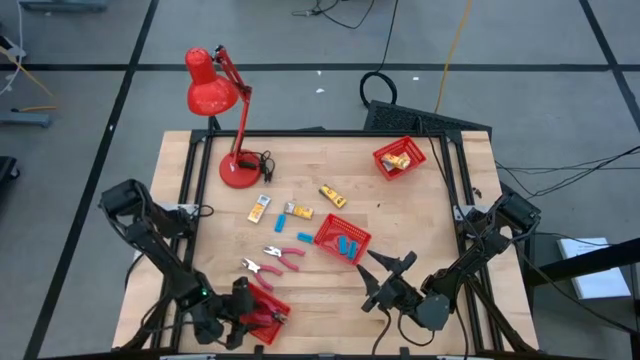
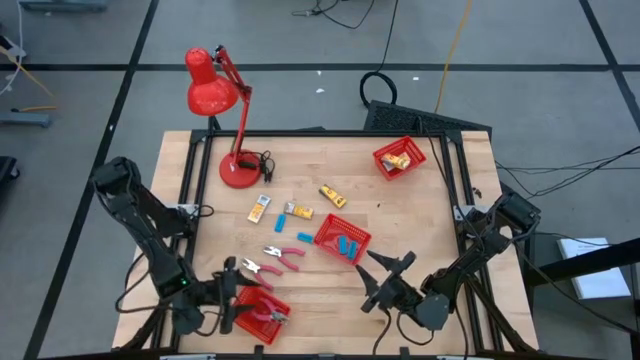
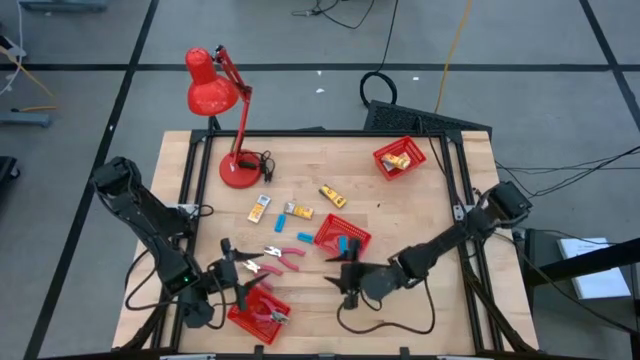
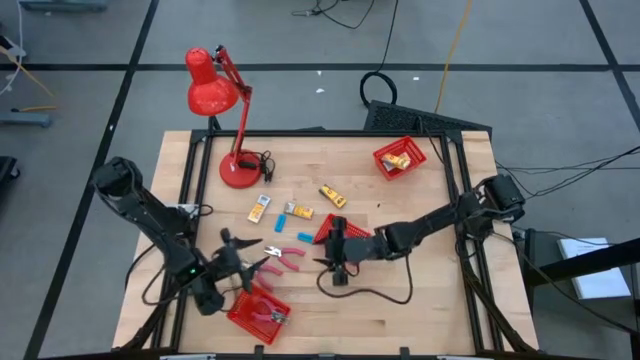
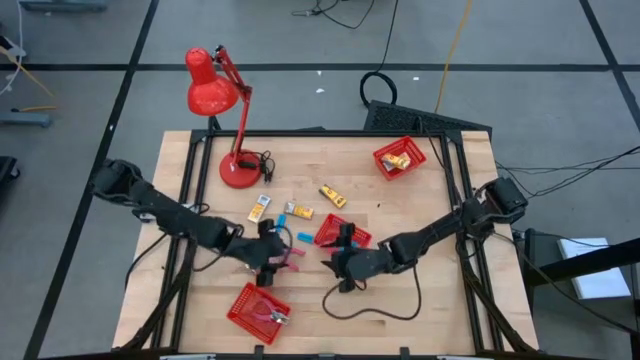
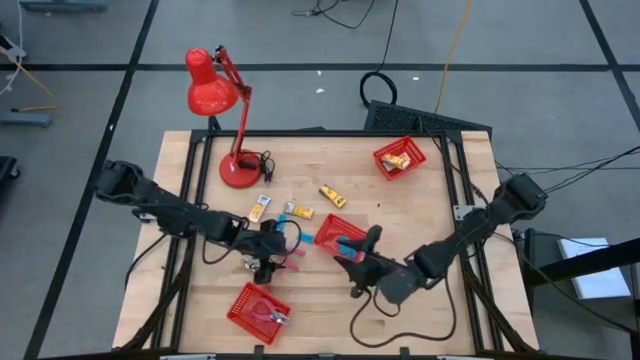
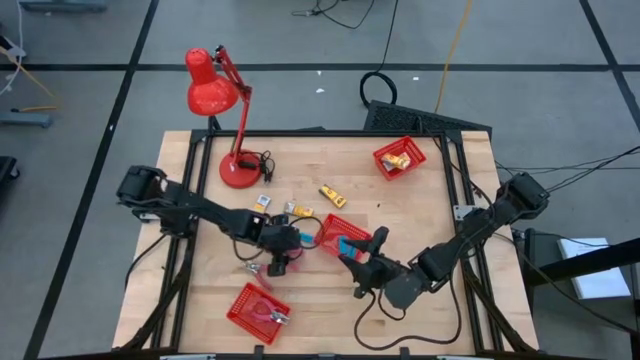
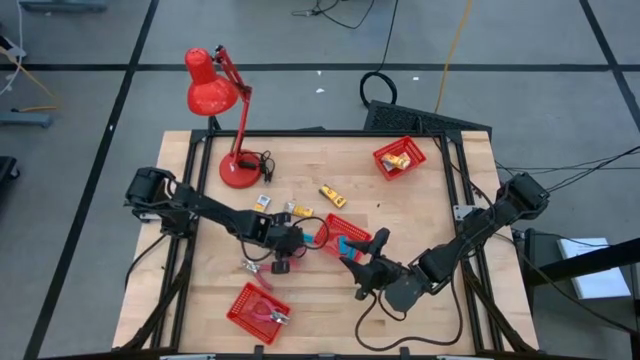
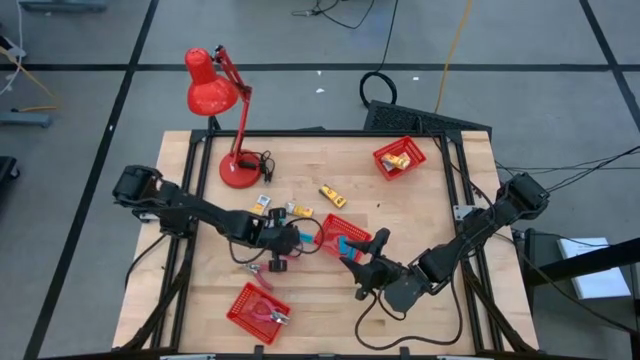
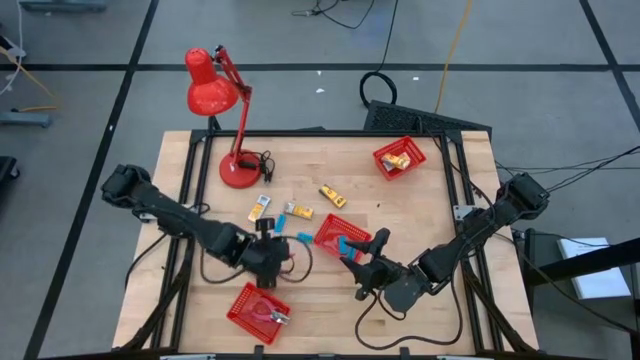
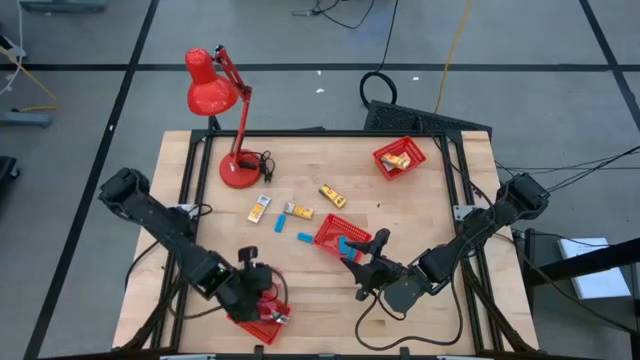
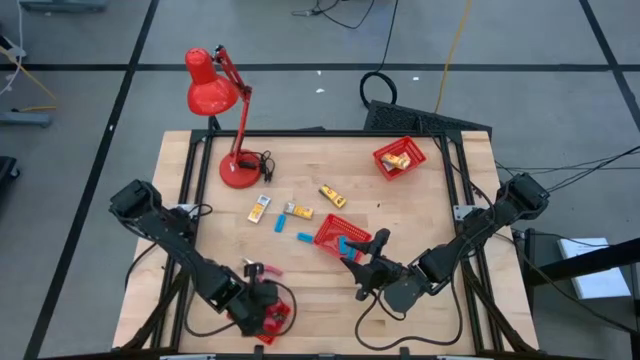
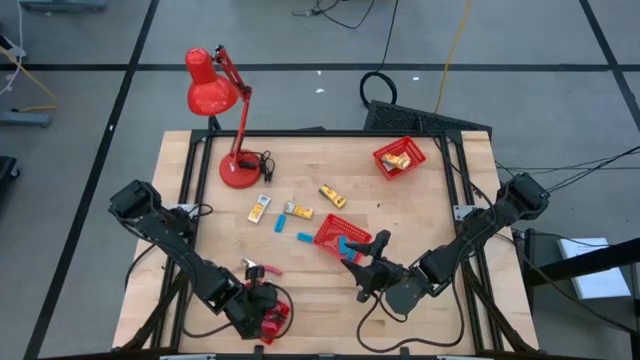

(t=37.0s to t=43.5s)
Task: Pick & Place School Supplies
Put the pink hole puncher into the bottom red bin

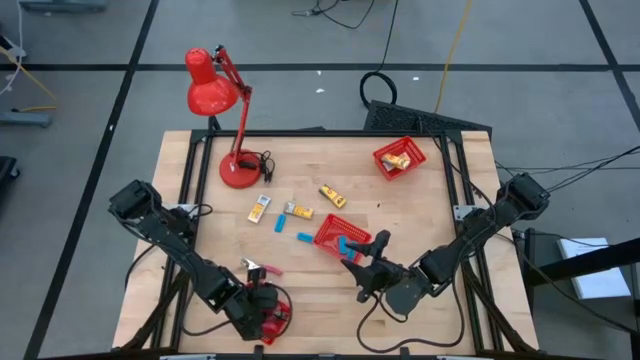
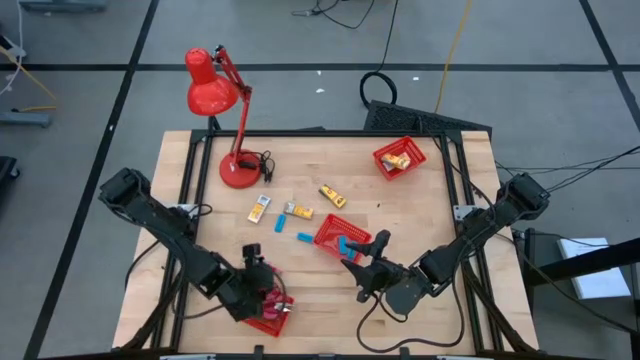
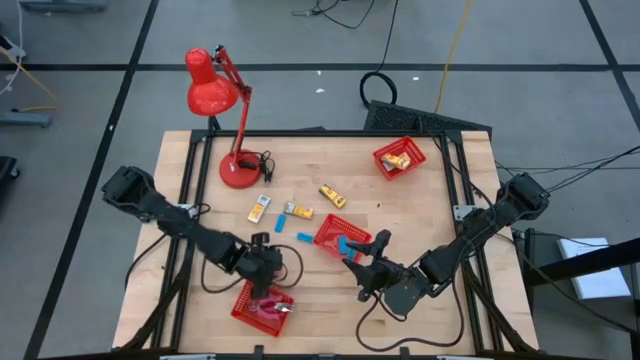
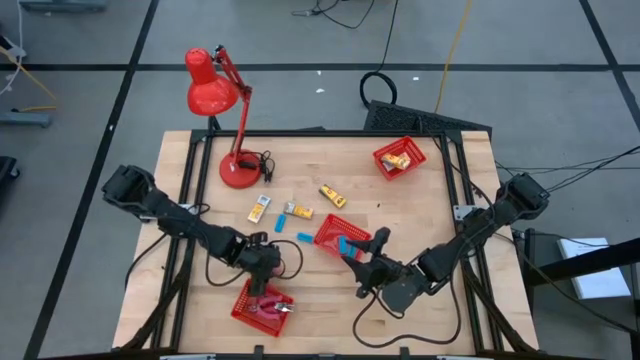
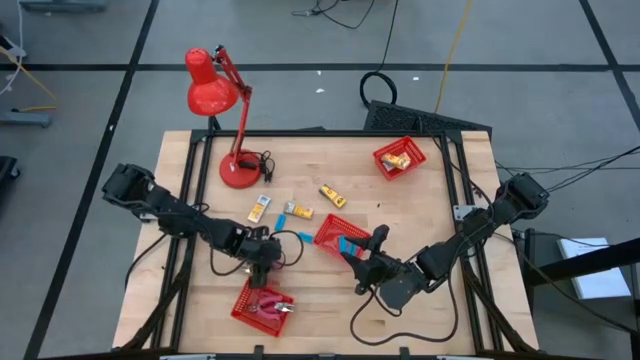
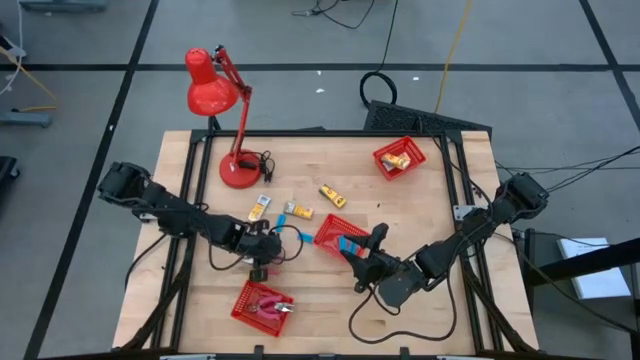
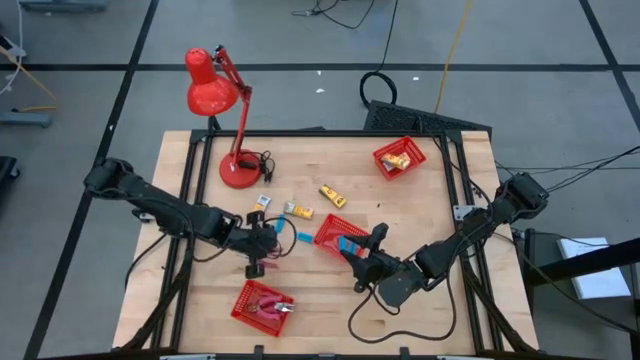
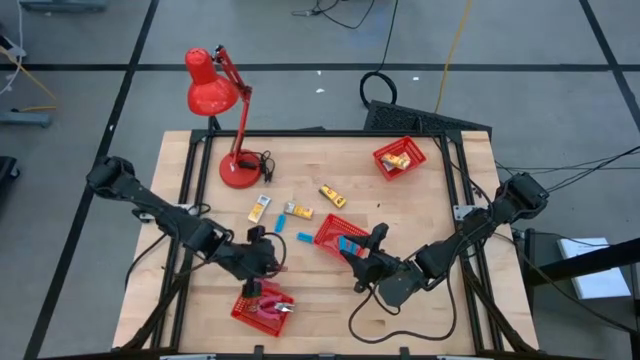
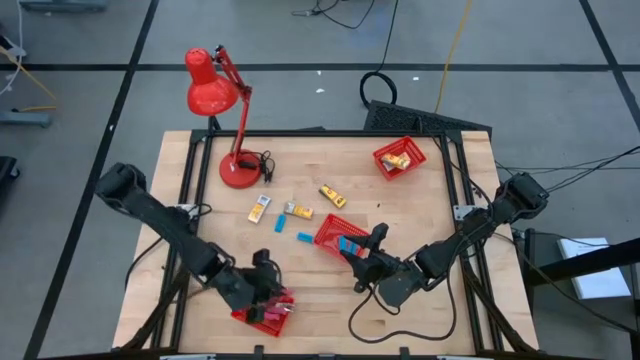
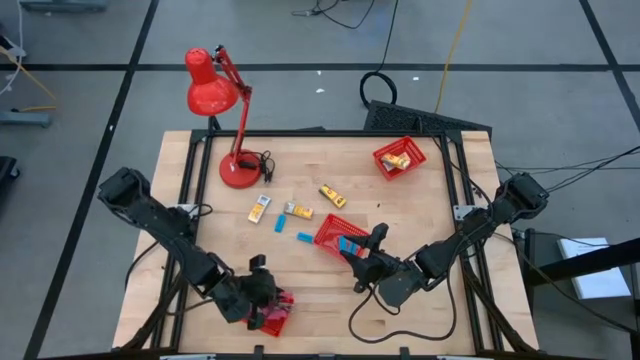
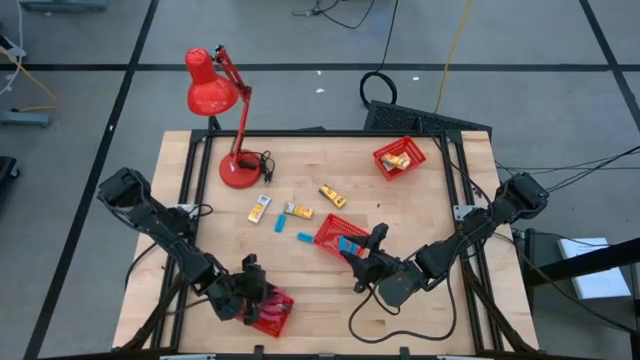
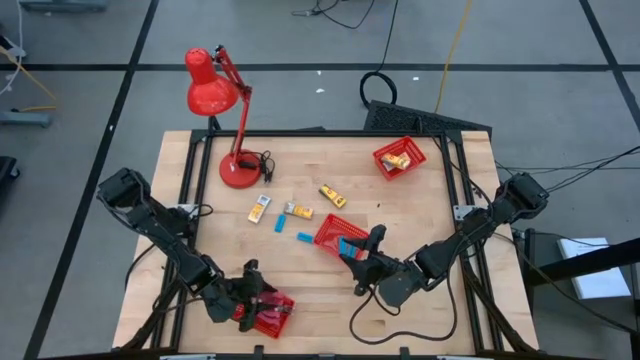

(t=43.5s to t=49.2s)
Put the pink hole puncher into the bottom red bin

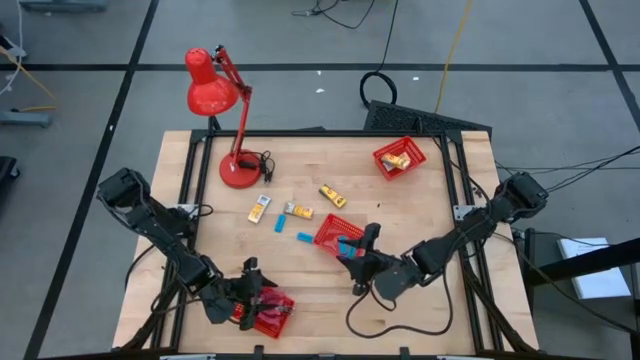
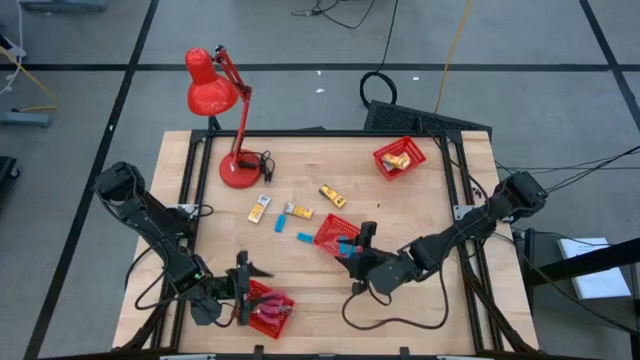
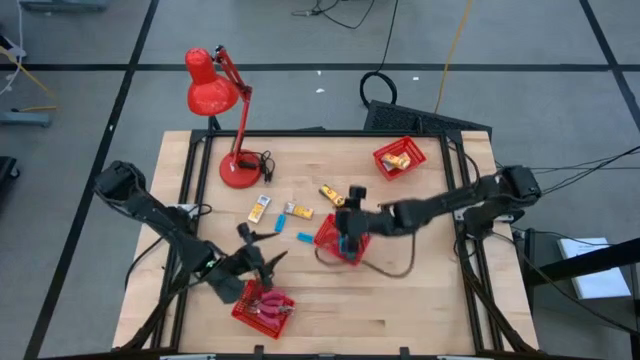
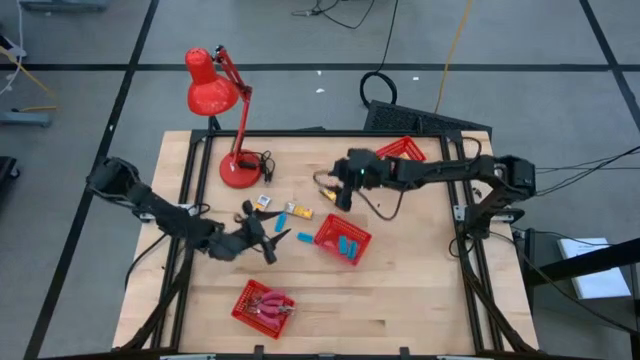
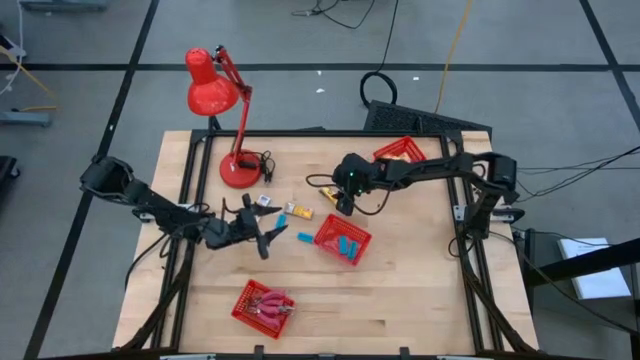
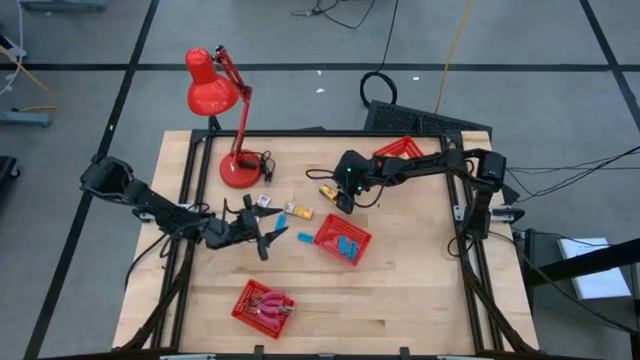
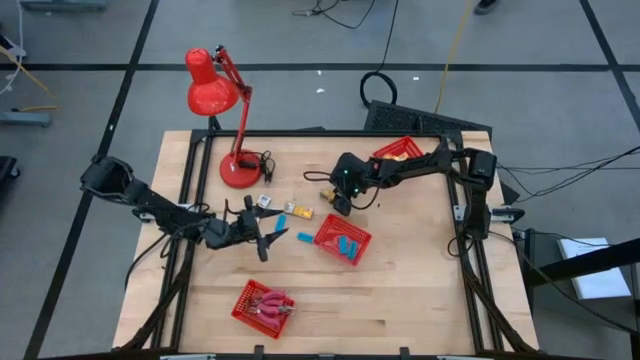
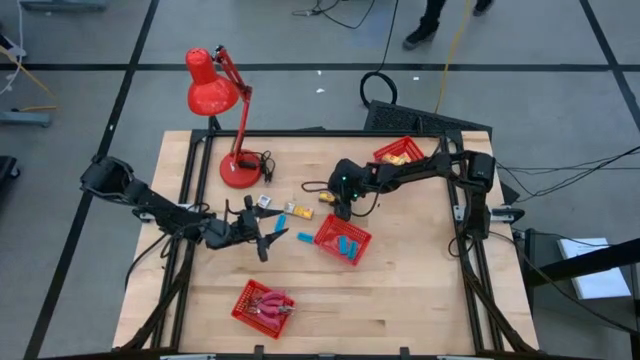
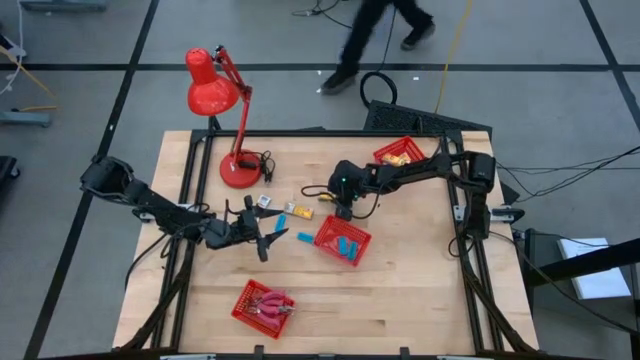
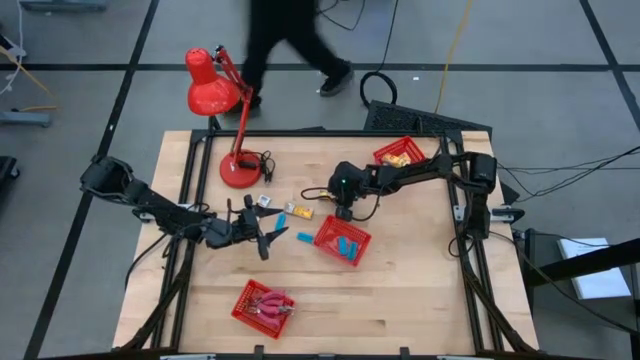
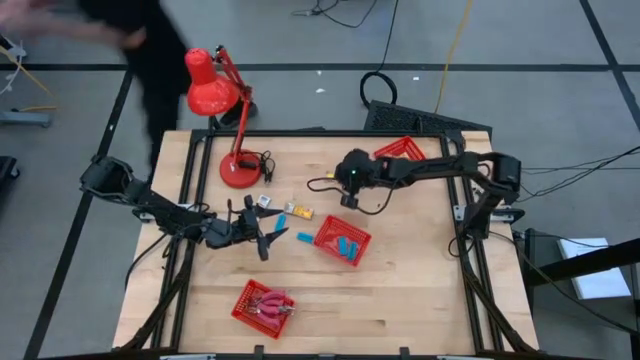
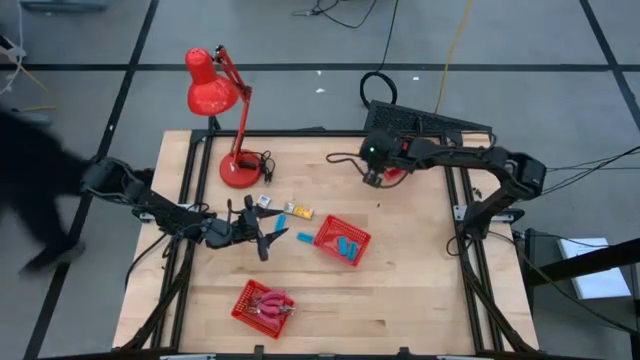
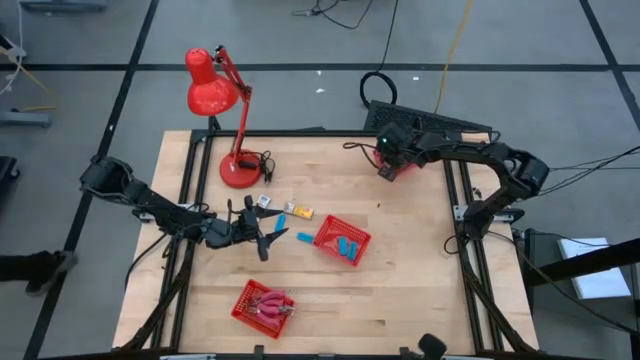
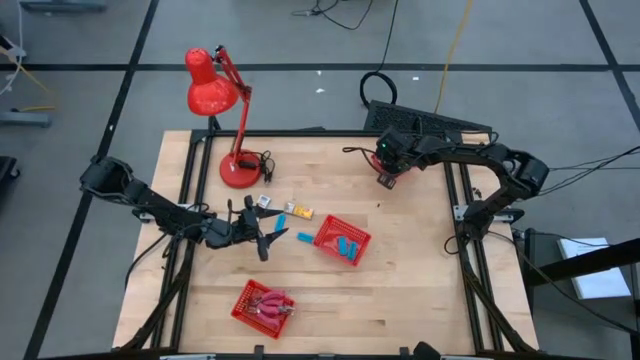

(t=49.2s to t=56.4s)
Put the yellow crayon box into the top red bin

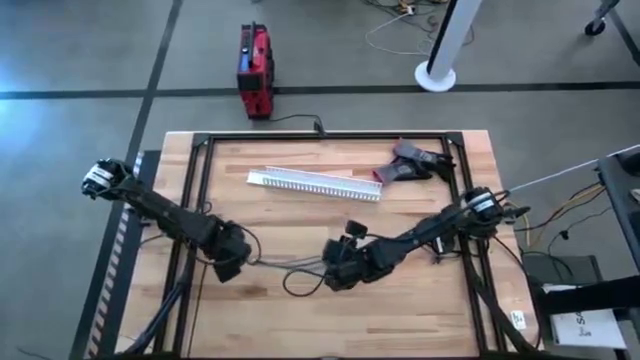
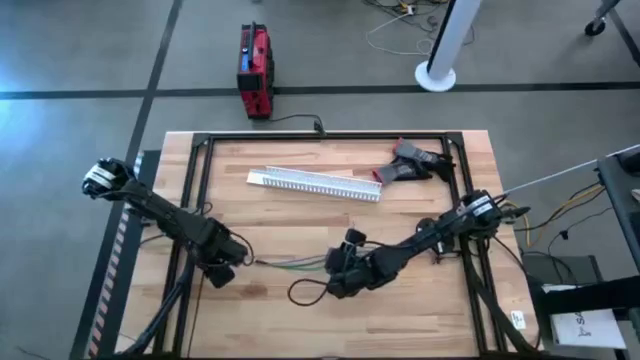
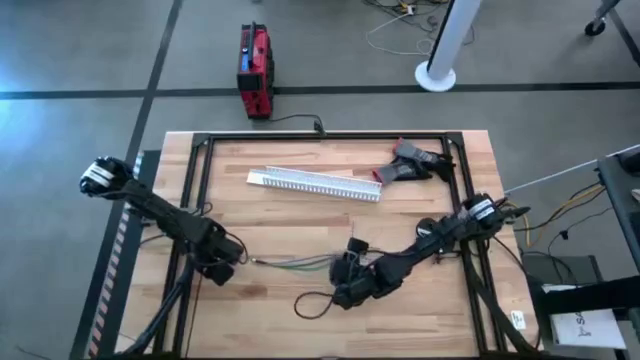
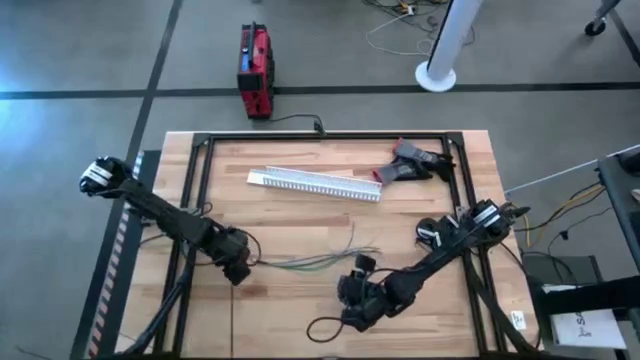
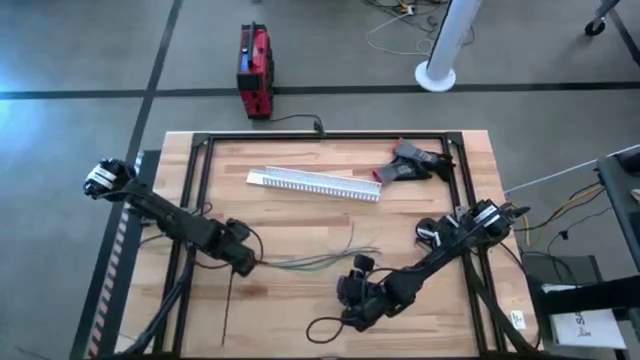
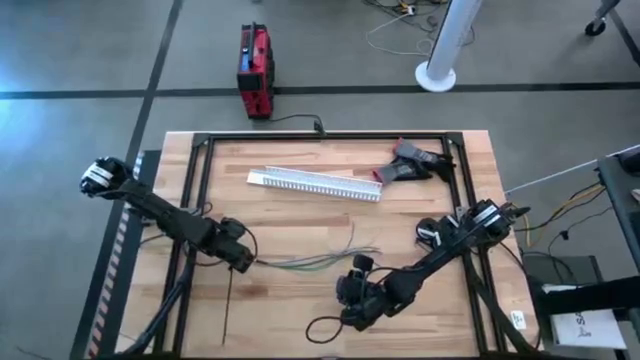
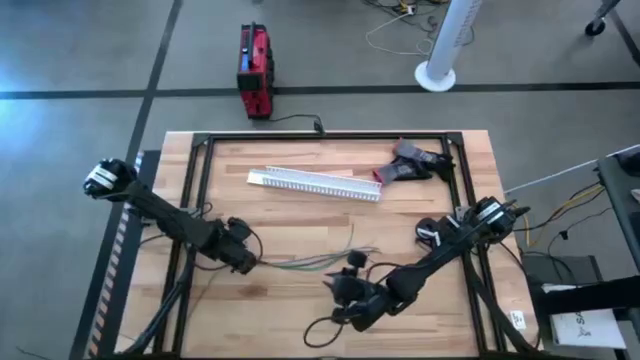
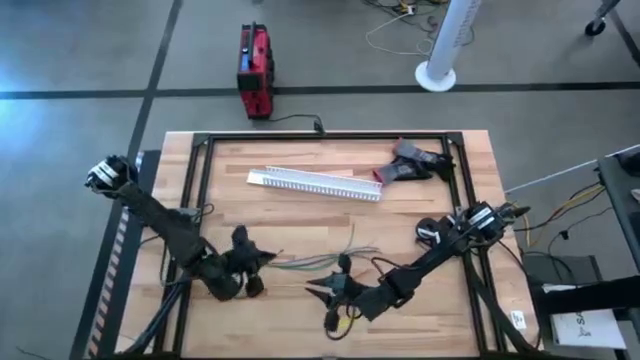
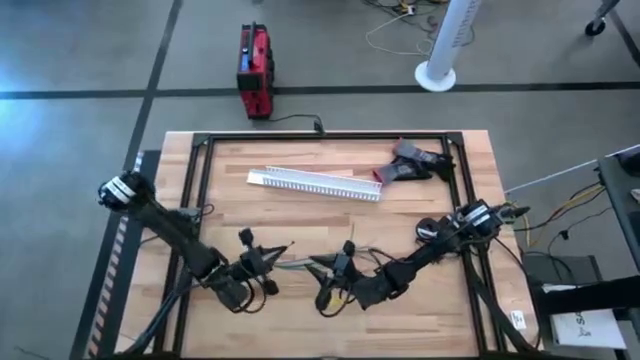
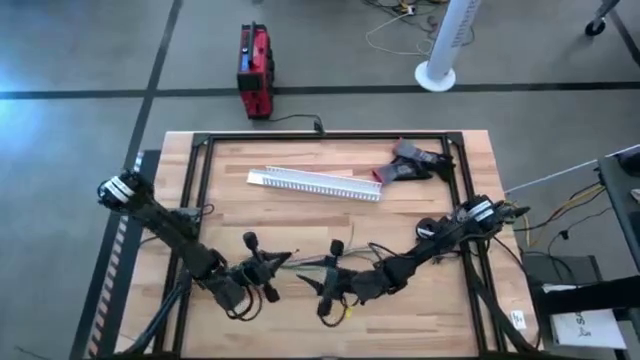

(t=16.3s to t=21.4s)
Task: Ziptie cables
Insert the black ziptie on the cable wires
